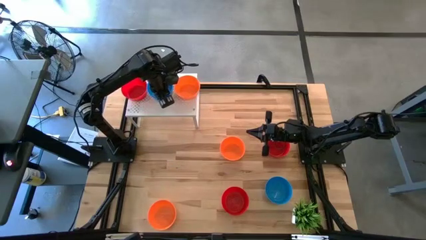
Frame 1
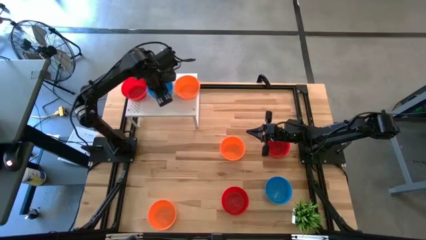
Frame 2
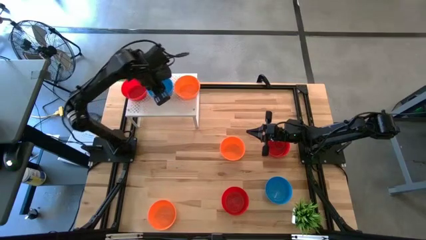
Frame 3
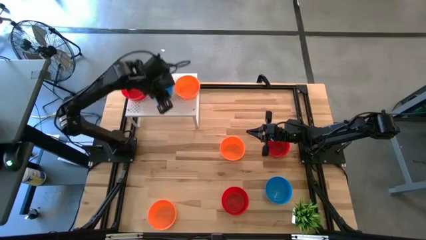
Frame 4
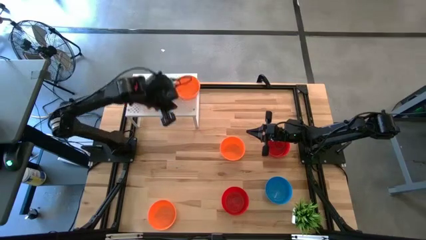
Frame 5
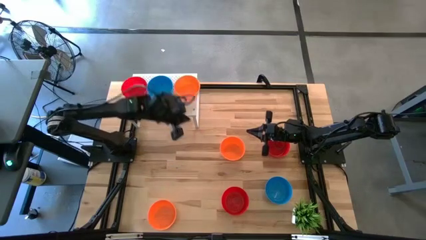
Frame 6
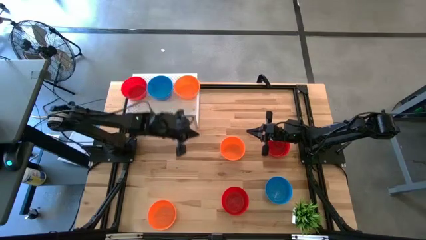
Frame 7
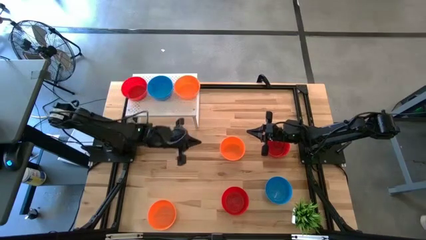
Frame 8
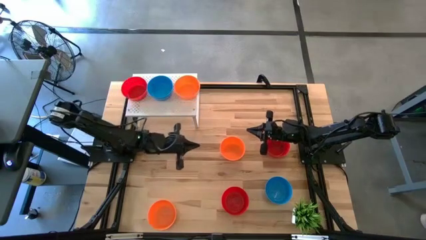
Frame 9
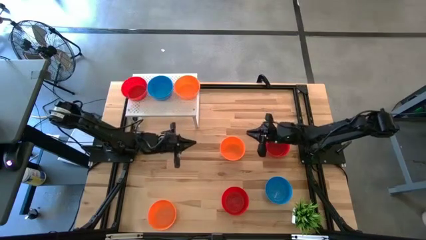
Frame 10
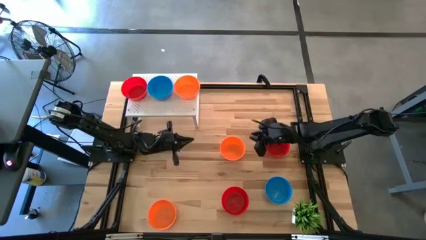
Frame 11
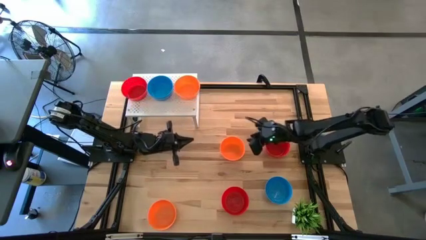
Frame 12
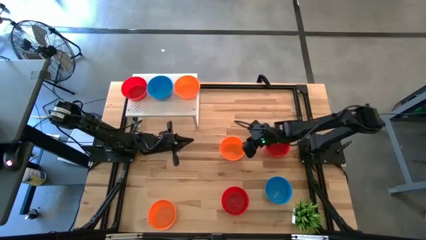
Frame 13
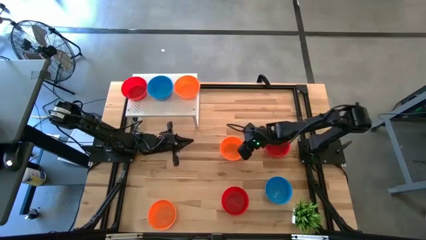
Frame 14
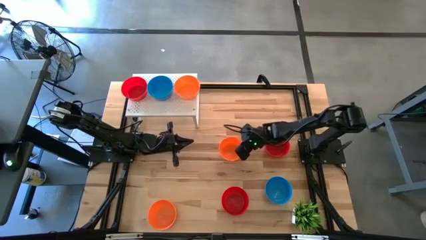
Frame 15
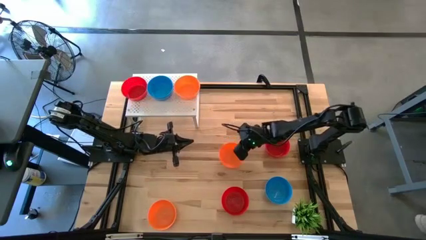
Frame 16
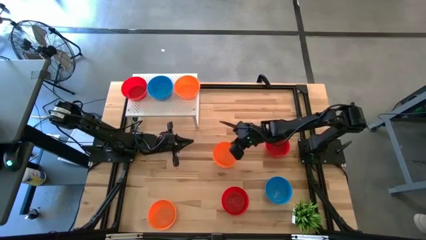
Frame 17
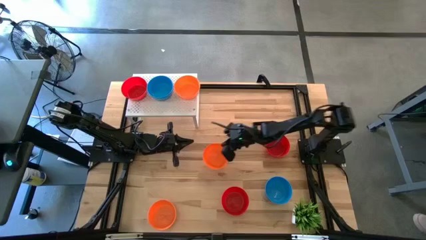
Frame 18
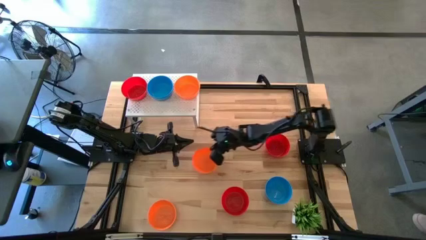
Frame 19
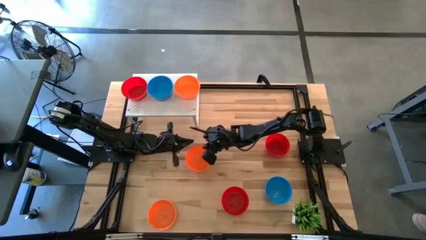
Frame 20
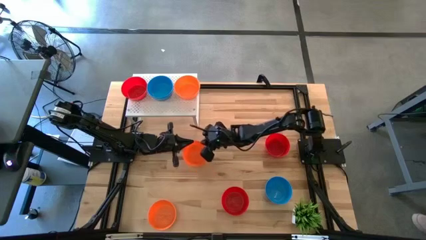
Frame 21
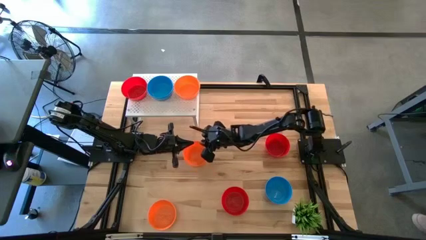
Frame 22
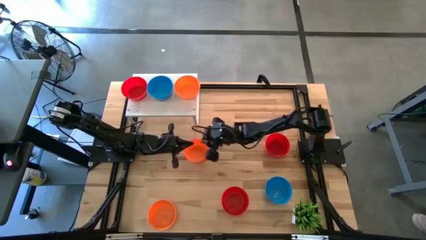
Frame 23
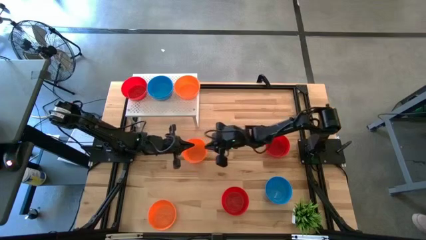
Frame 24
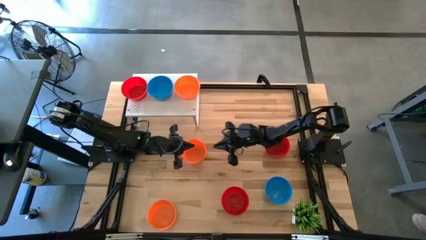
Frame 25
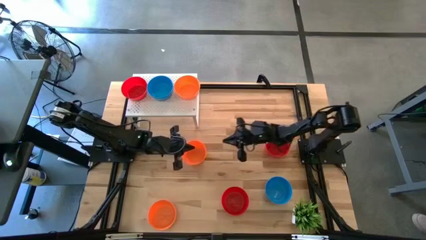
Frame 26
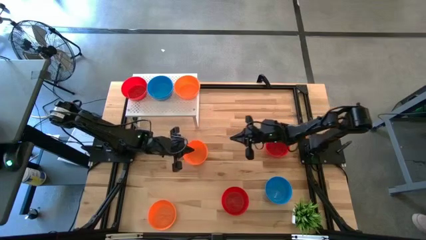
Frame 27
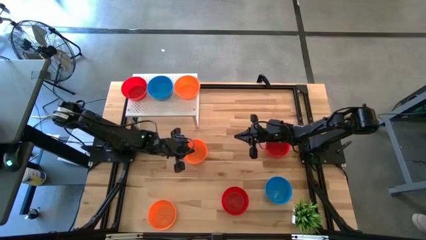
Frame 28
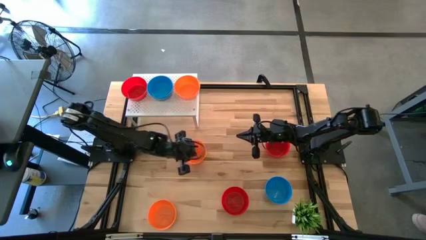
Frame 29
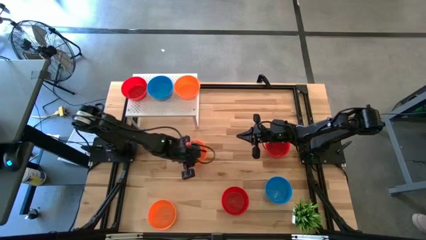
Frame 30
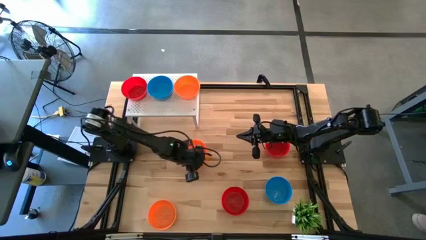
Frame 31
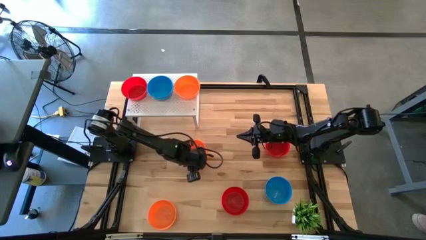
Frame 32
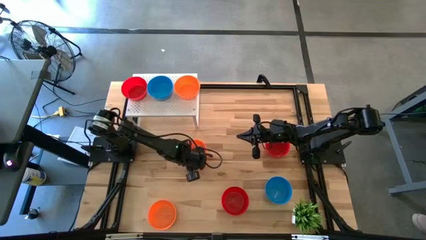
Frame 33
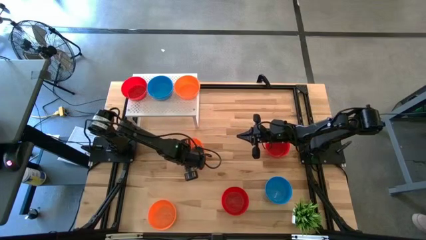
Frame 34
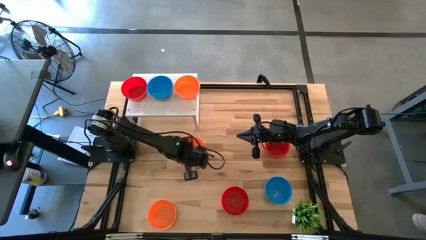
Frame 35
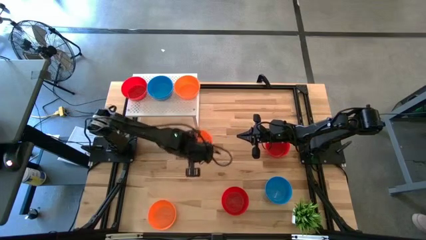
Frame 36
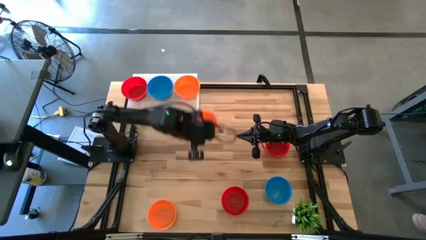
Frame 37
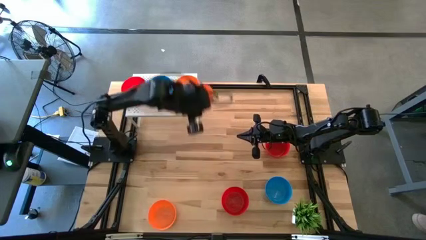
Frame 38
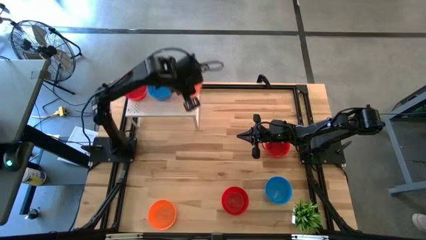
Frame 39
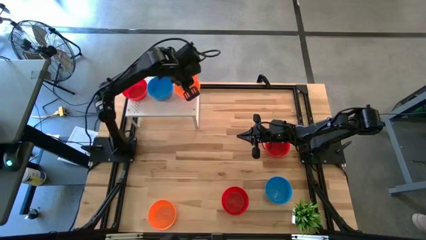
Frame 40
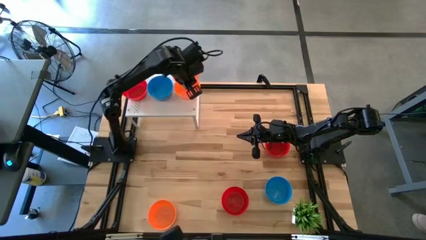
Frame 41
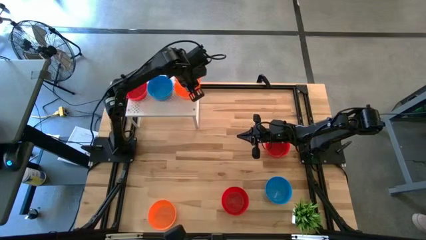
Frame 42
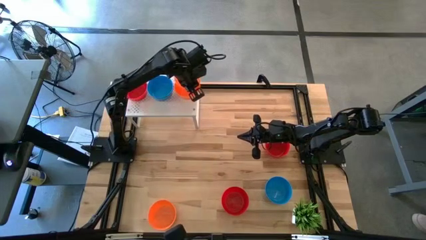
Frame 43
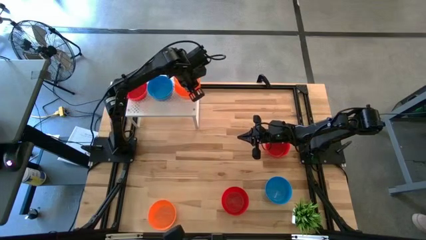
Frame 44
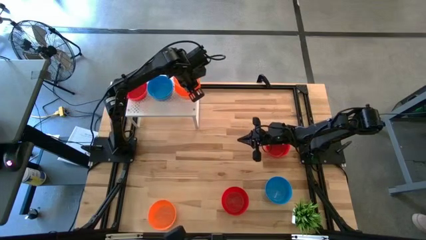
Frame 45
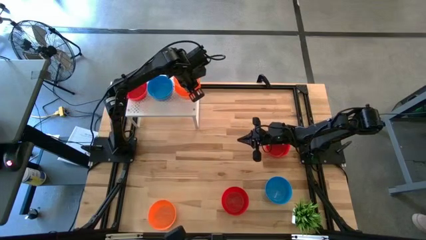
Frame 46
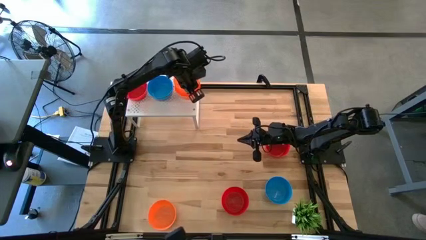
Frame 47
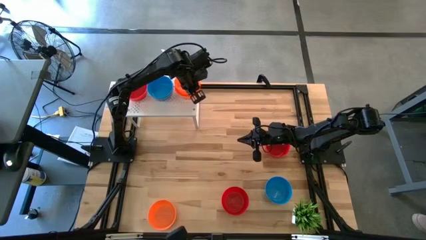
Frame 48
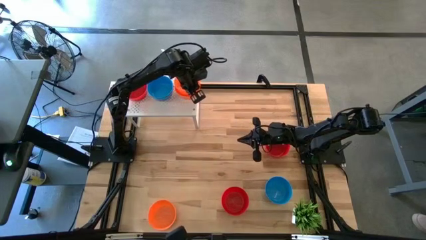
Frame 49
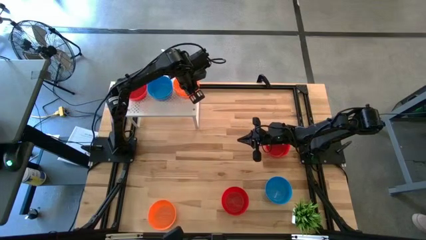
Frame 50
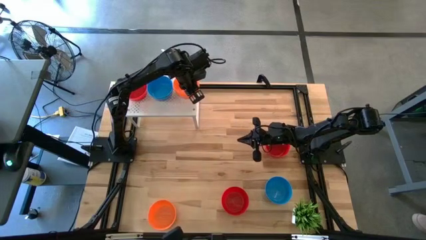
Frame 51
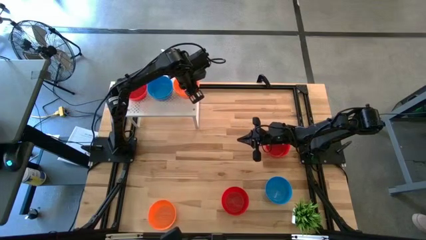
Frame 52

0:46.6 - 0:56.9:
Task: Pick & Place Mini bowls
Stack the top orange bowl on the orange bowl on the shelf
